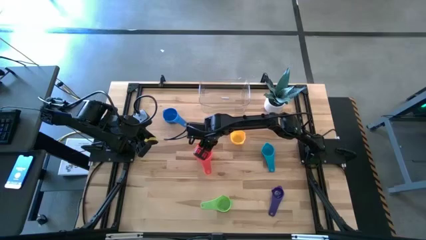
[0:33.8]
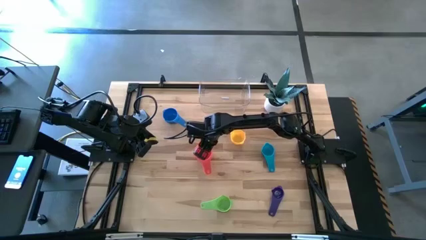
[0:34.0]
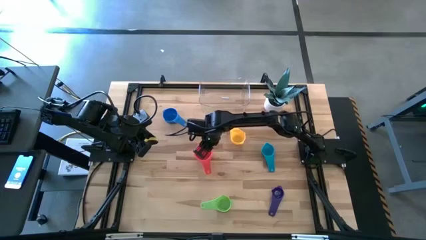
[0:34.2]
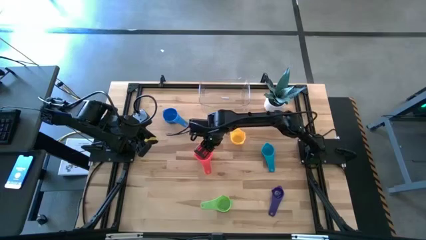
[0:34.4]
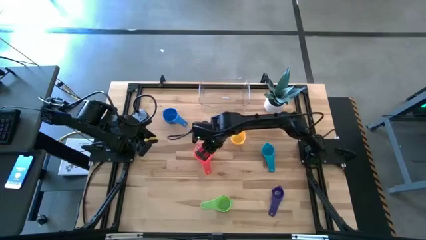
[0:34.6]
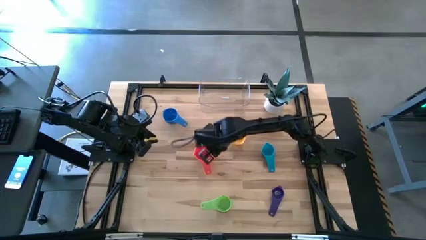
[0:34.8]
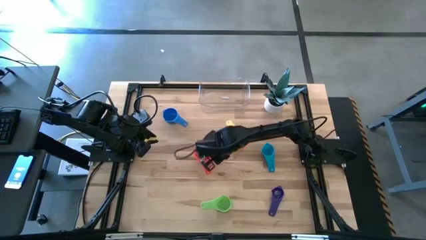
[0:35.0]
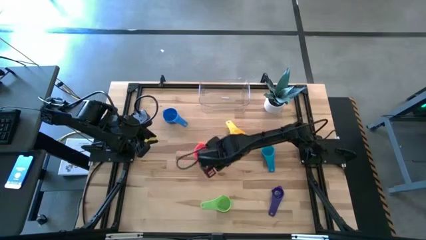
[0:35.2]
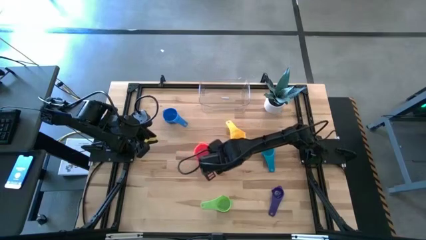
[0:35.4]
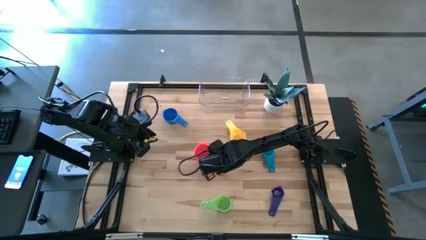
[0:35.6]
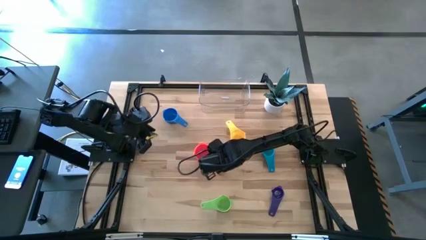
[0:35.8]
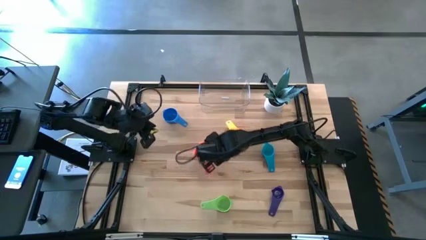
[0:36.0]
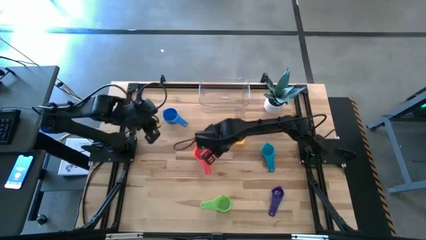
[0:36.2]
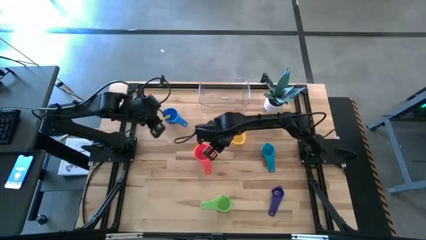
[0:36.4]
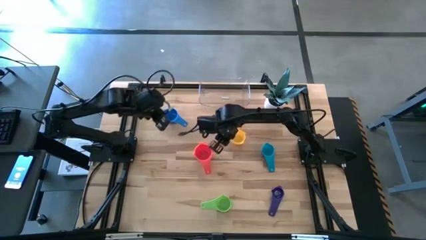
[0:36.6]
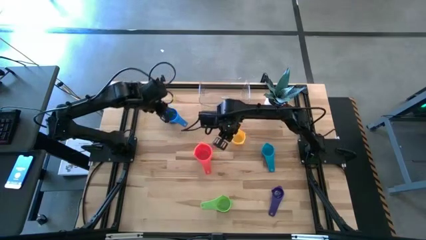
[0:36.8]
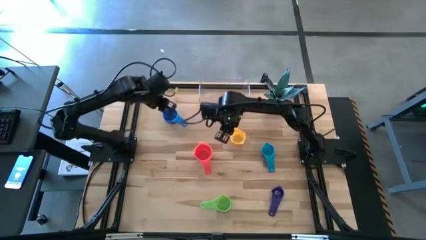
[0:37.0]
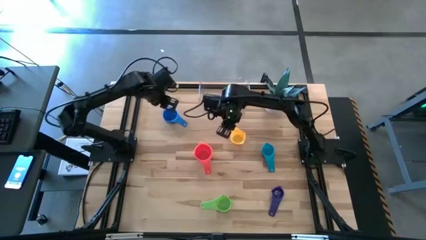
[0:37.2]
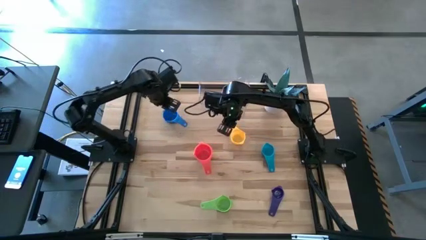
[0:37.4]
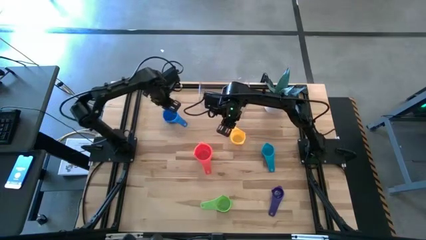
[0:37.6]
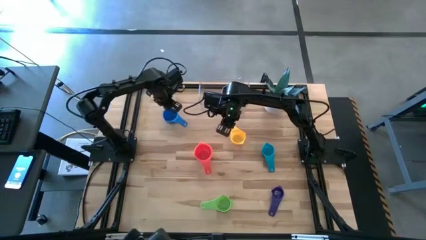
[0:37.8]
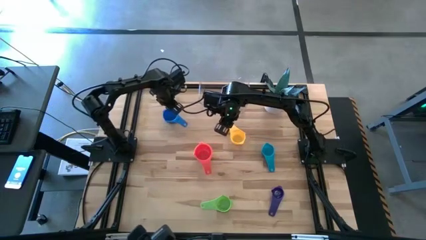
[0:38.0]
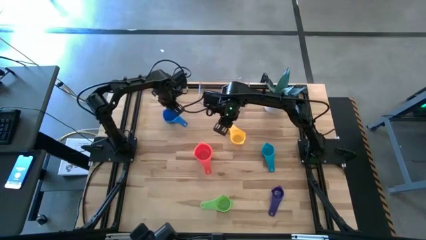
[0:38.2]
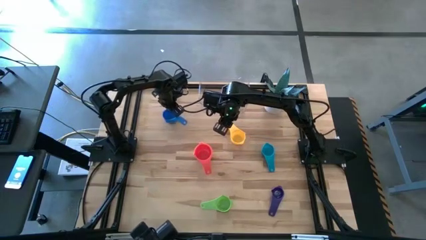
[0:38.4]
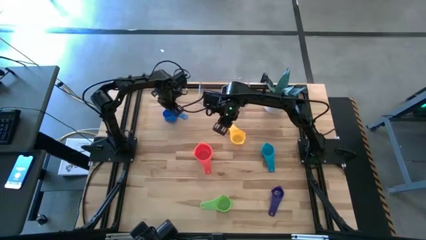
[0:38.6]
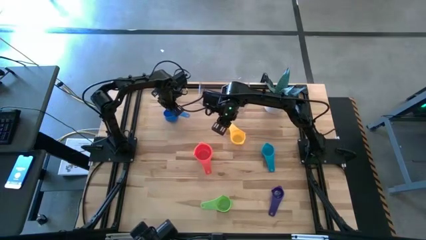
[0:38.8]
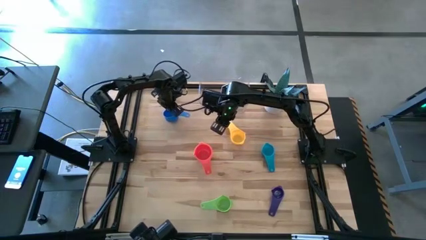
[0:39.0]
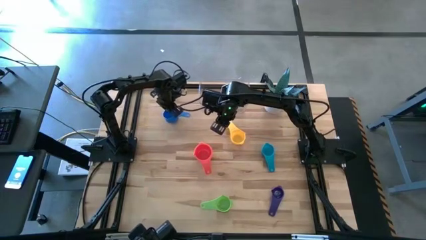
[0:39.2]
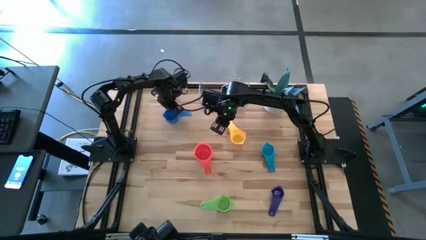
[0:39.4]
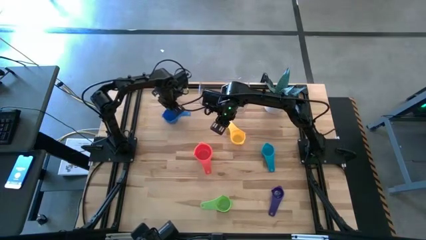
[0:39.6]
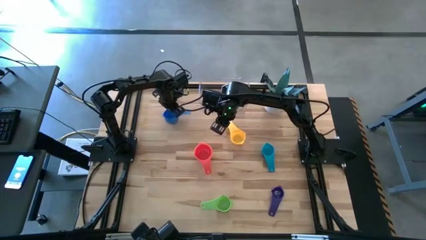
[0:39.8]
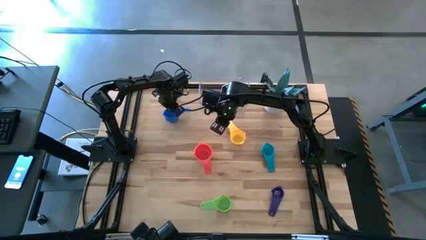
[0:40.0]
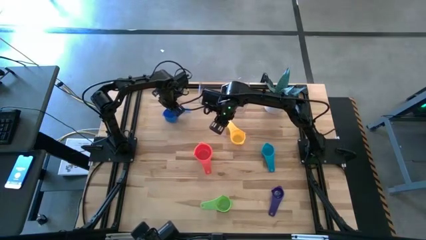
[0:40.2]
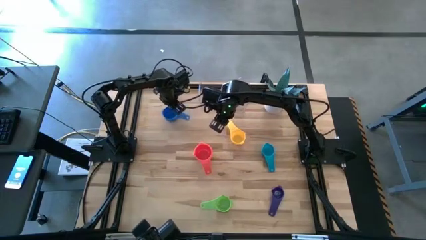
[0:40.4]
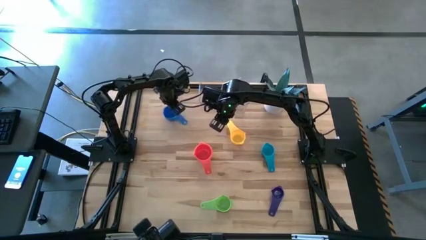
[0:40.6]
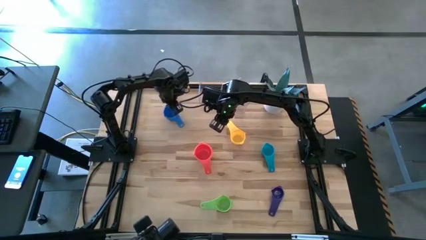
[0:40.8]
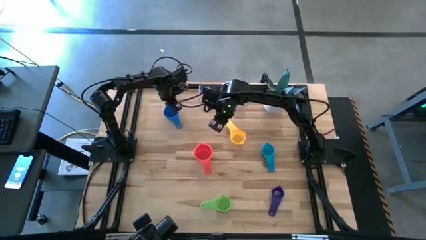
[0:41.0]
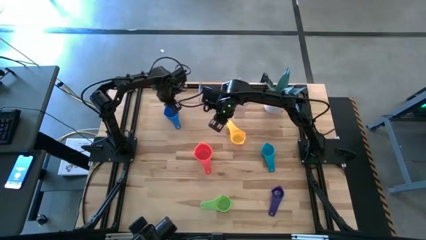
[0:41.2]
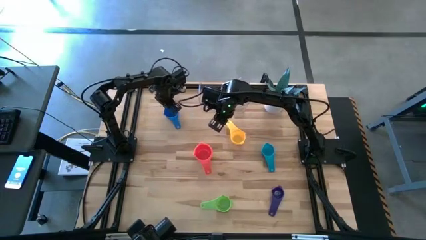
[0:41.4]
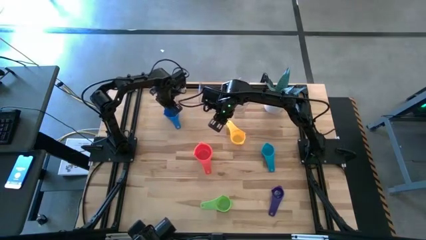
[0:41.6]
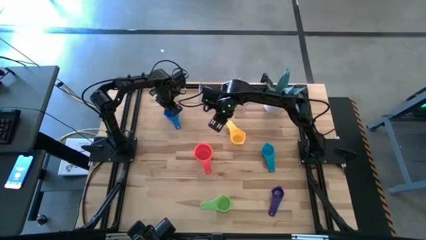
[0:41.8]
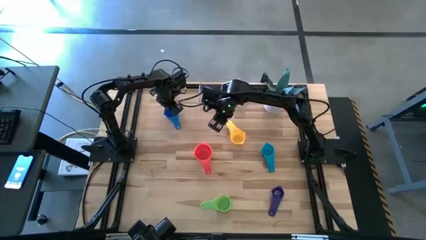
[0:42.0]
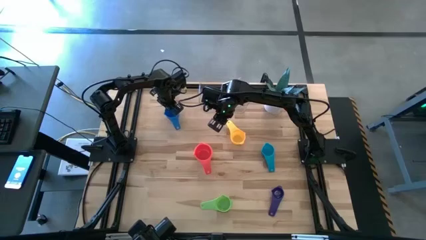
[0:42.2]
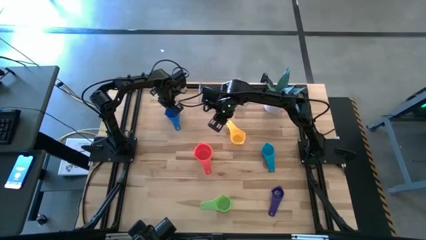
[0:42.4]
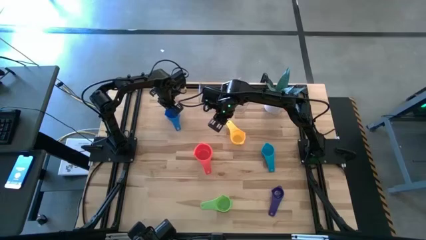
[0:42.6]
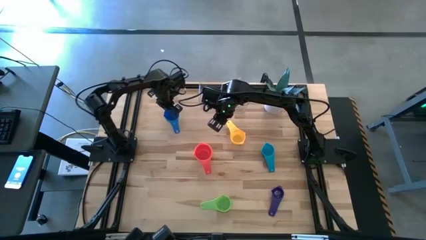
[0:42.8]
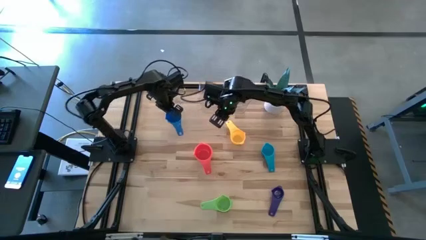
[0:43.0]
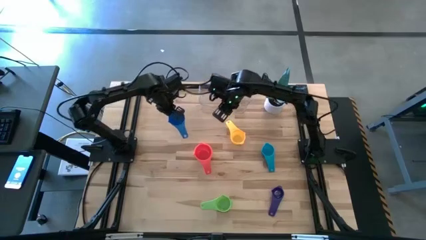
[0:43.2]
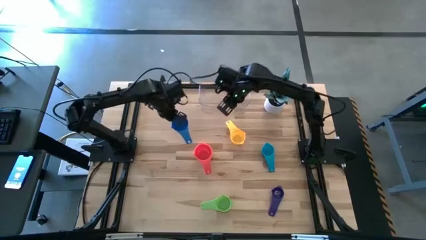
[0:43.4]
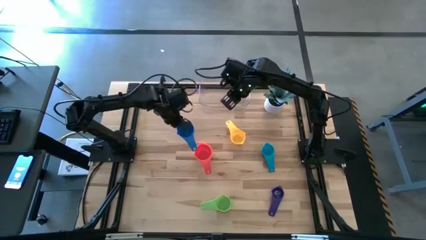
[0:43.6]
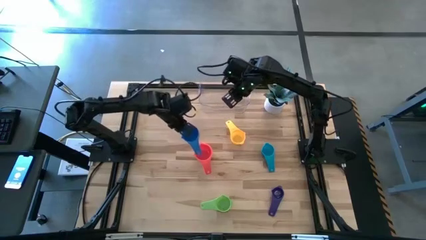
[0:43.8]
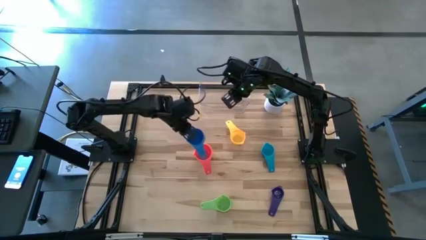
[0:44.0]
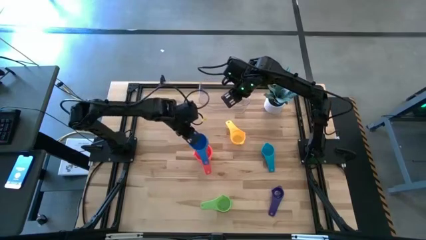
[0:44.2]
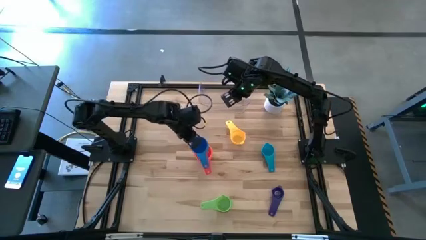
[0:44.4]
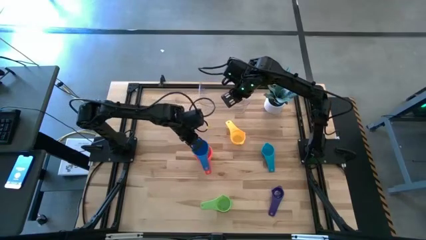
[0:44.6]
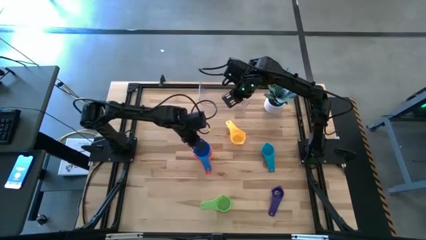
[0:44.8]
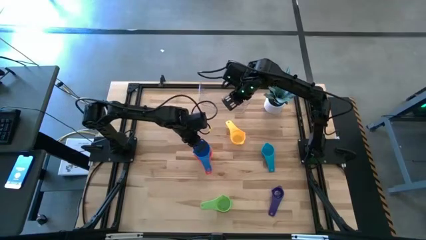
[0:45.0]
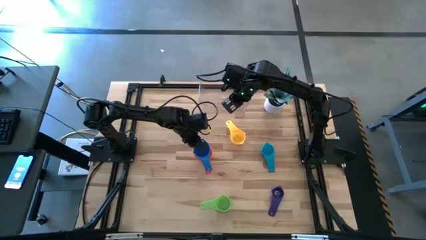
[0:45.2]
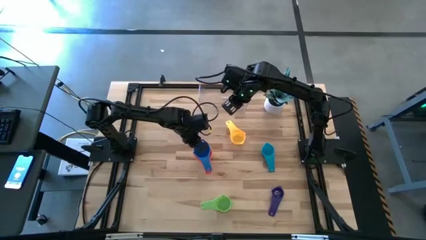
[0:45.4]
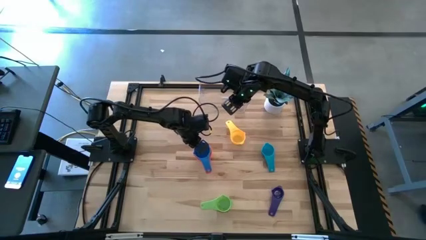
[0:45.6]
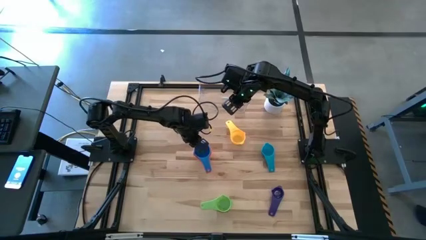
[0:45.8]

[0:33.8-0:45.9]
Task: Nest measuring cups in basket
Stack the blue measuring cup on the top of the red measuring cup

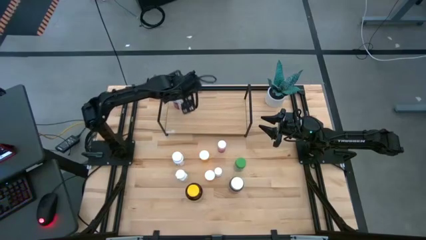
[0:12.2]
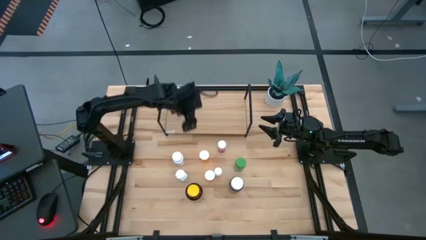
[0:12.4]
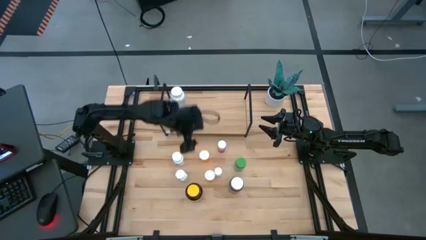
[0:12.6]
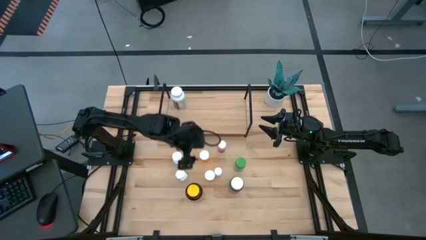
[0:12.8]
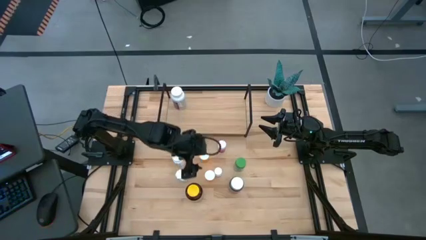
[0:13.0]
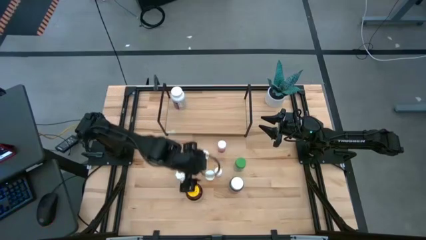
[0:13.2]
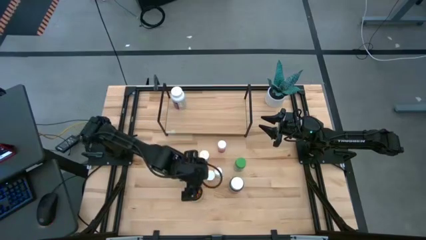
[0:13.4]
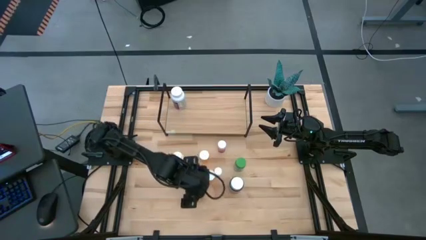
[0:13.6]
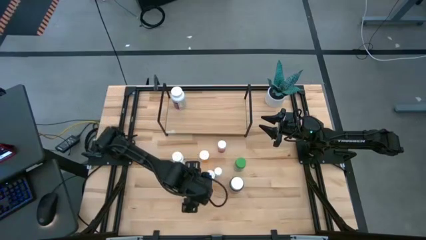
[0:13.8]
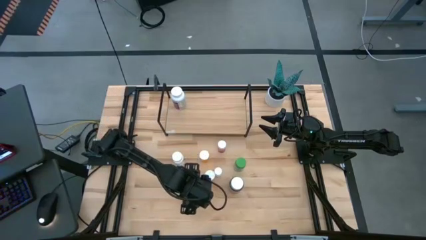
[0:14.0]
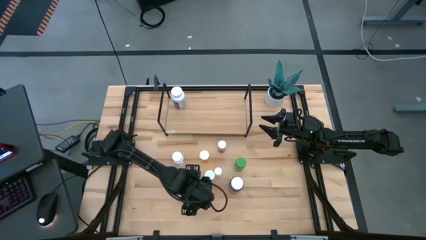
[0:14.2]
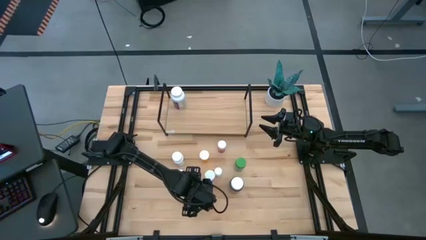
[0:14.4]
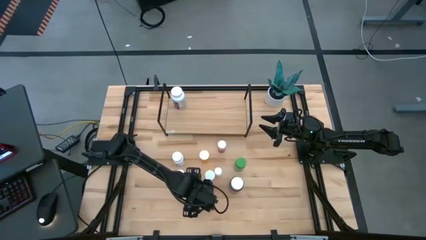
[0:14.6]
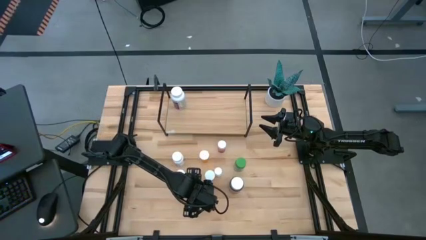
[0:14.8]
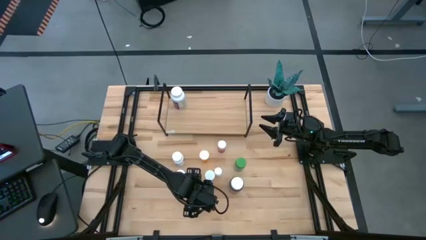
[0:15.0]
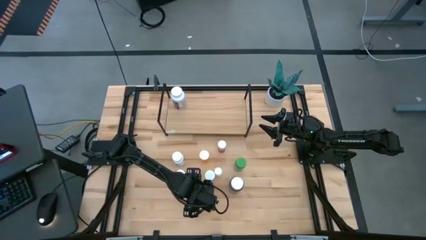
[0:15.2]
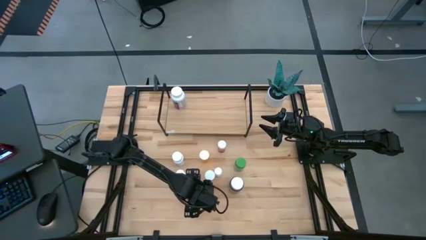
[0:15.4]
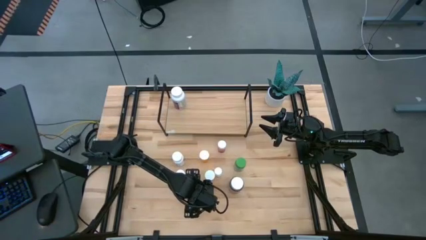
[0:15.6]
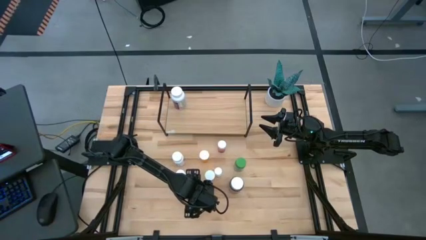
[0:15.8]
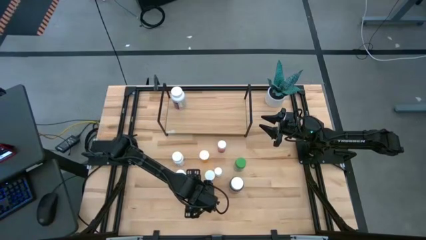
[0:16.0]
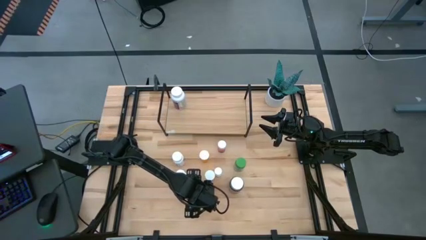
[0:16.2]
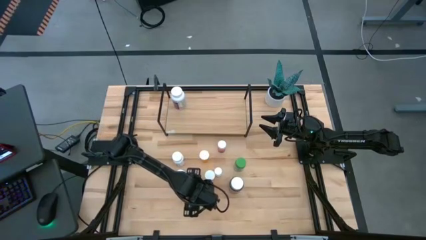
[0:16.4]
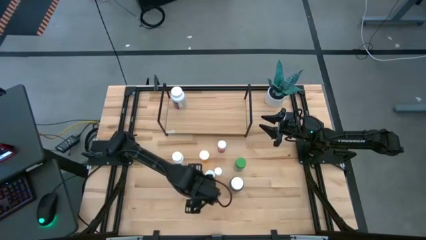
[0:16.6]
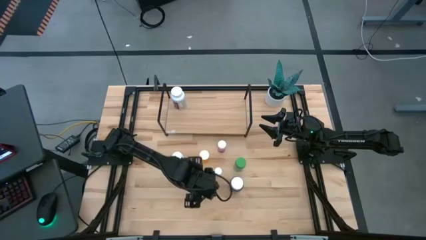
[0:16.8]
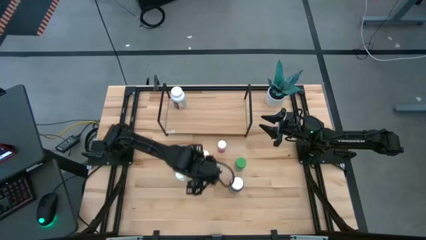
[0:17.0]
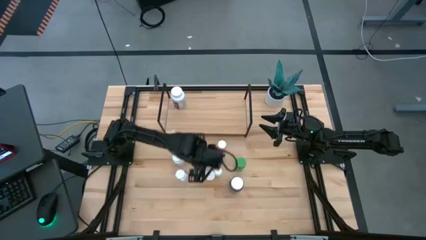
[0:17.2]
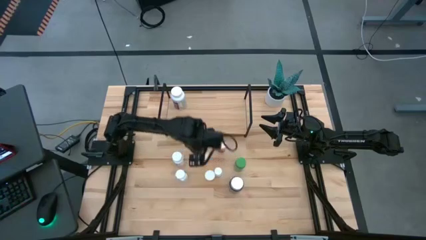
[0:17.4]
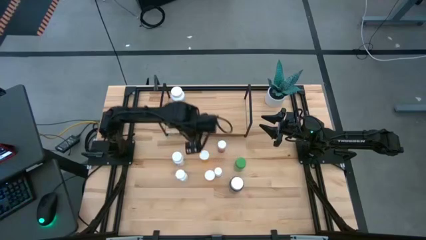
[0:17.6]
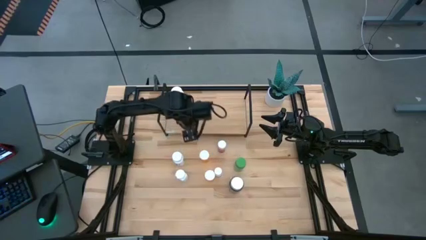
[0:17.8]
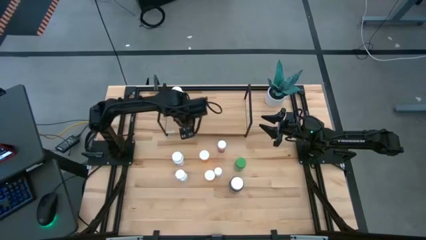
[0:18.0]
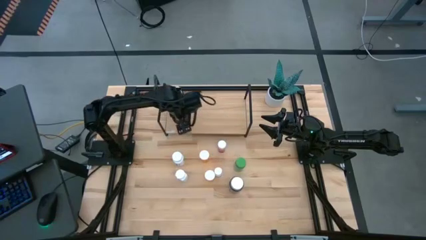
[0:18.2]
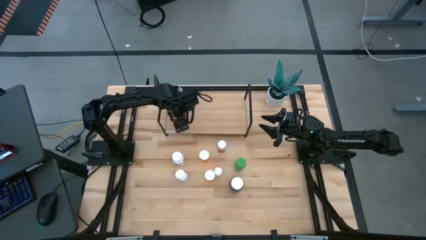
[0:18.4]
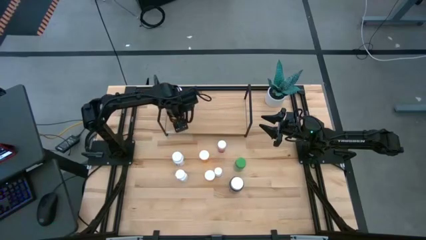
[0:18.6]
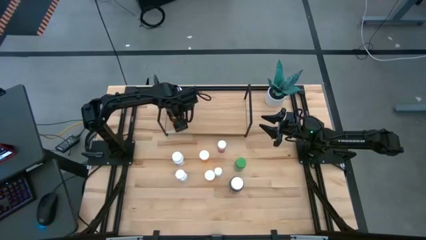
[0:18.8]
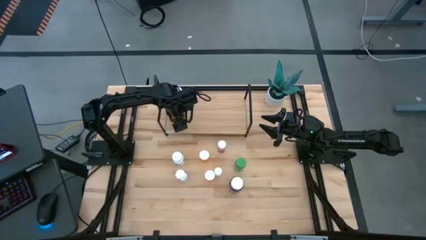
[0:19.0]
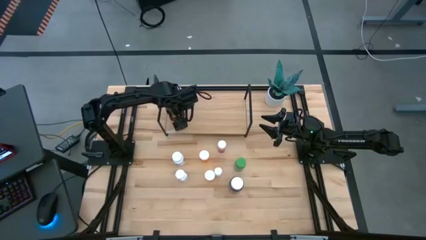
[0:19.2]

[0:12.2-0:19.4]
Task: Pick and place medicine bottles onto shelf by color
Put the yellow pill bottle on the shelf
